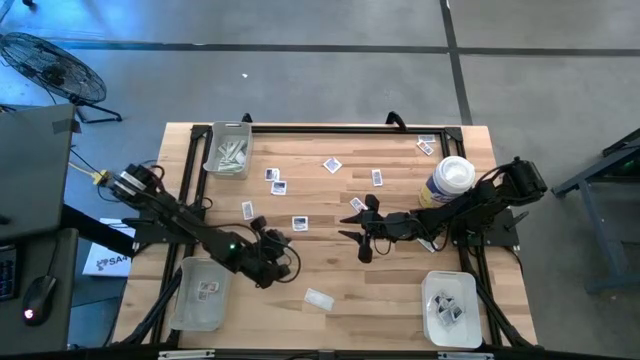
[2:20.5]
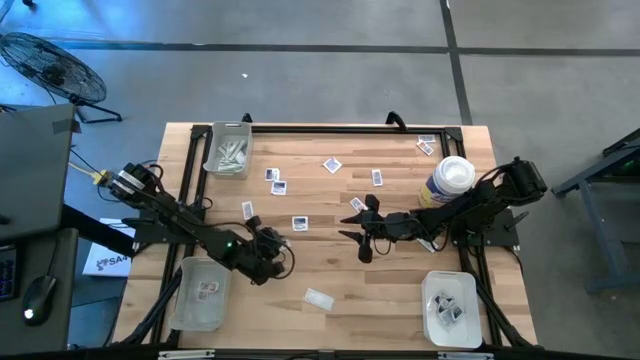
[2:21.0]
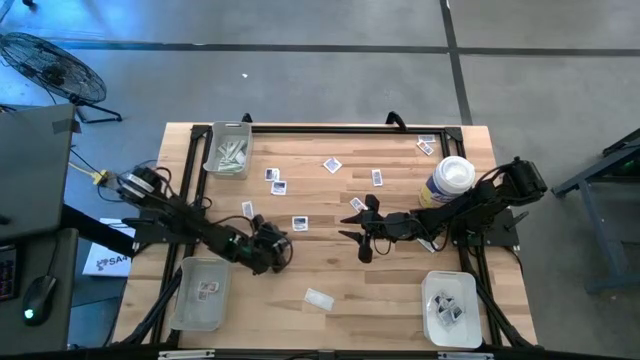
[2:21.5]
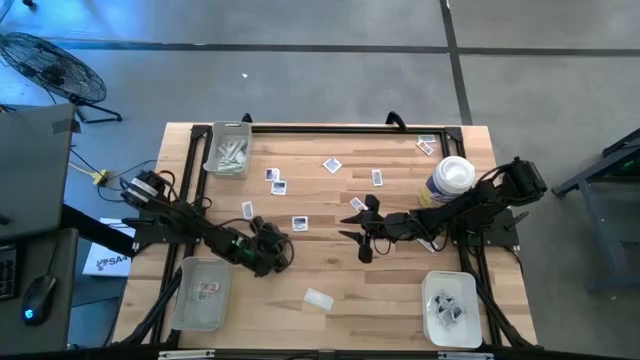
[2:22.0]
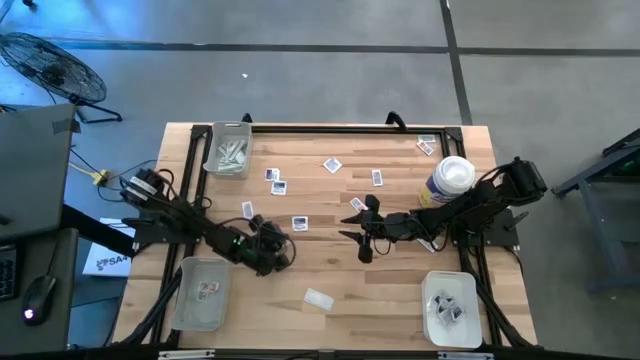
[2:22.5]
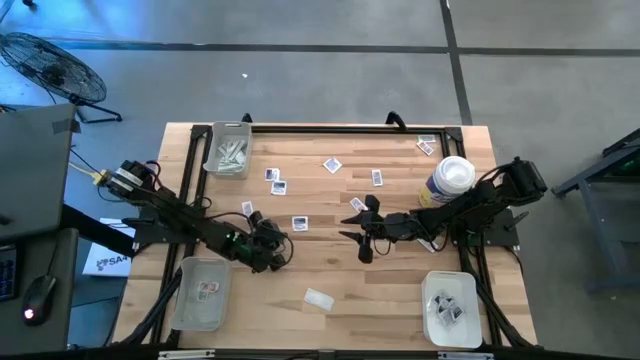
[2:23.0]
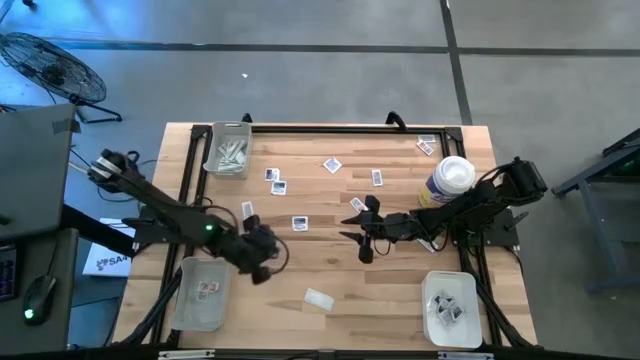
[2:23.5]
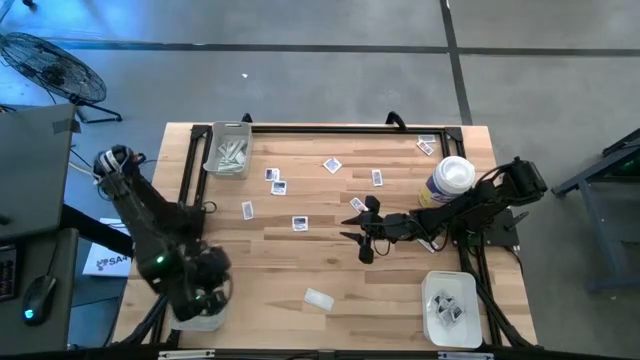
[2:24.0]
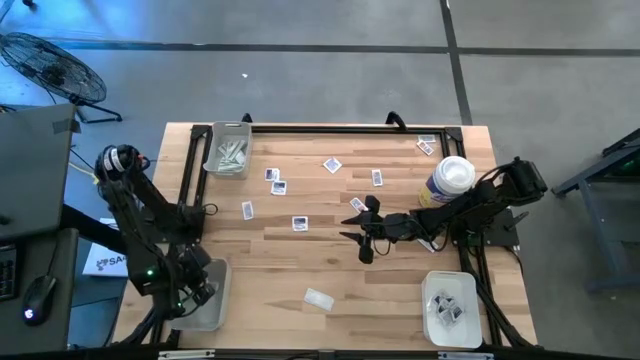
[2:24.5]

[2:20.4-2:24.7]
Task: Pick & Place First Aid Supplies
Put the orange ointment pack into the bottom gray bin

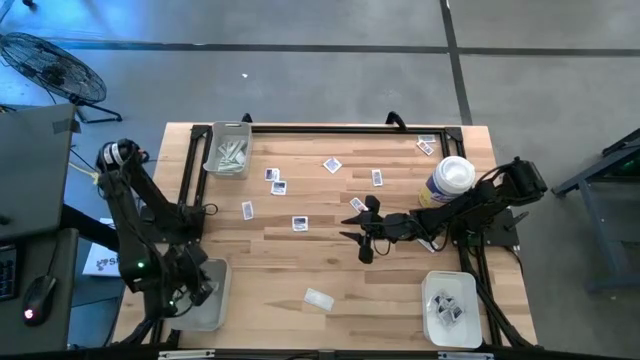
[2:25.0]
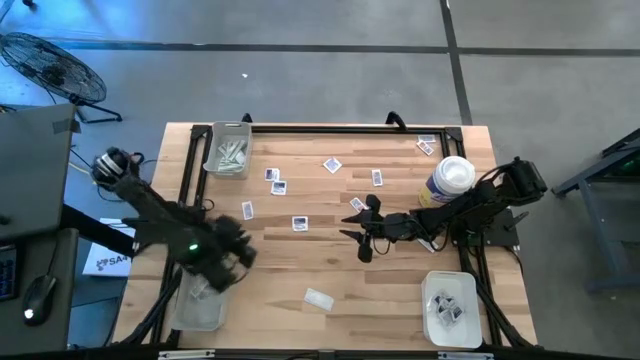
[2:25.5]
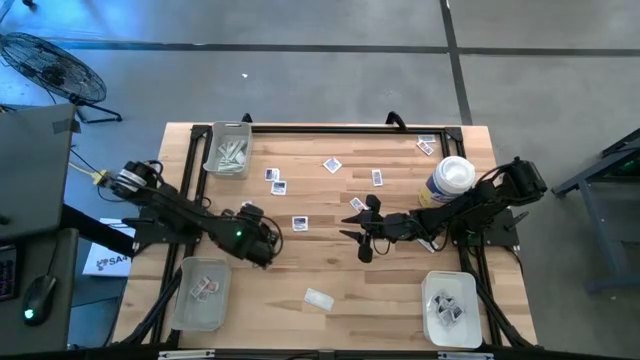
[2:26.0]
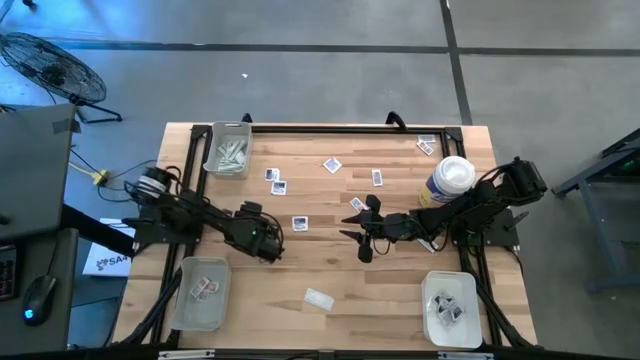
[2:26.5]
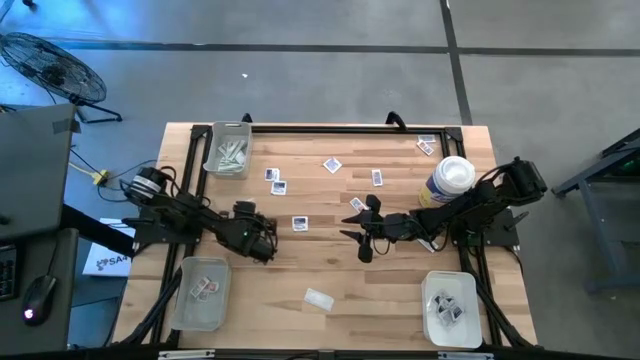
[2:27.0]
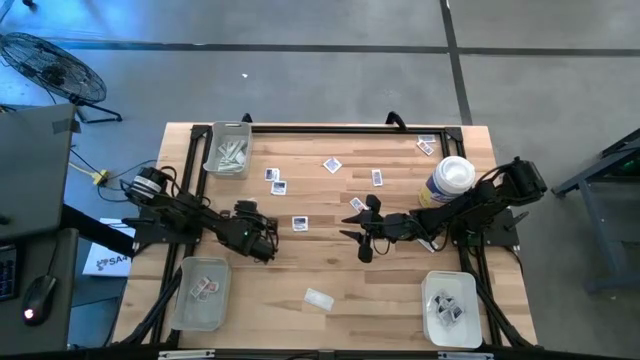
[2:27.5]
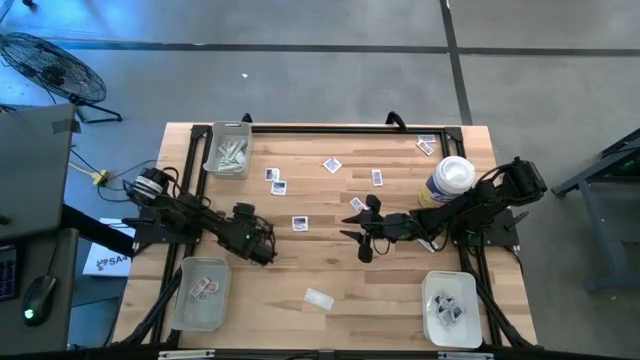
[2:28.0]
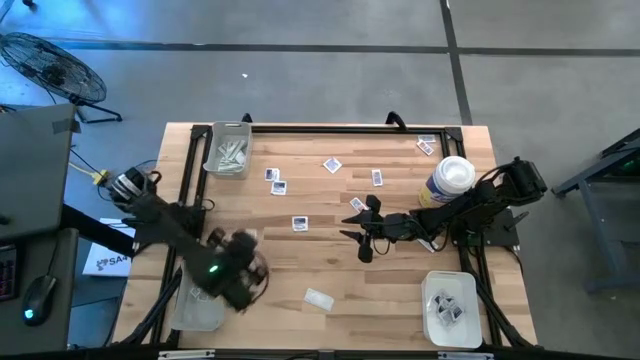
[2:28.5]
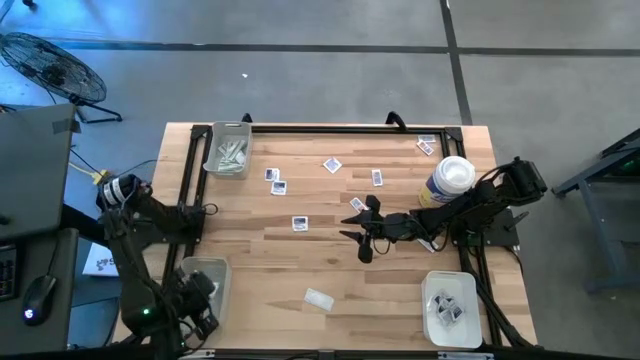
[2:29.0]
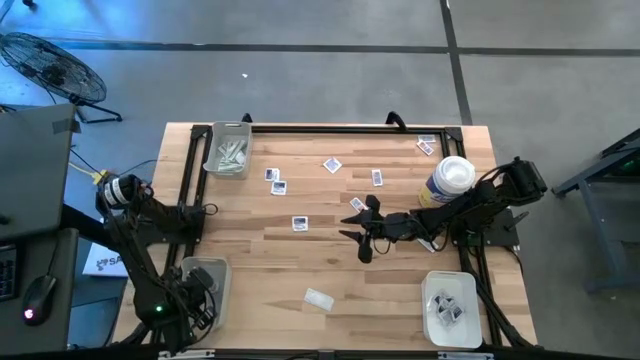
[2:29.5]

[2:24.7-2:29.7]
Put the orange ointment pack into the bottom gray bin

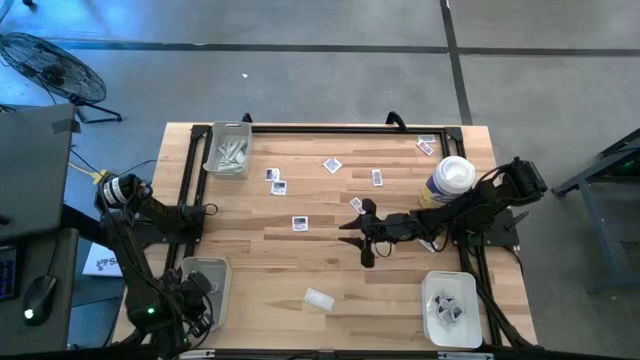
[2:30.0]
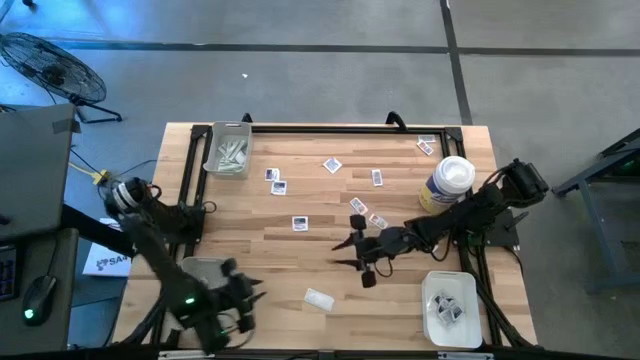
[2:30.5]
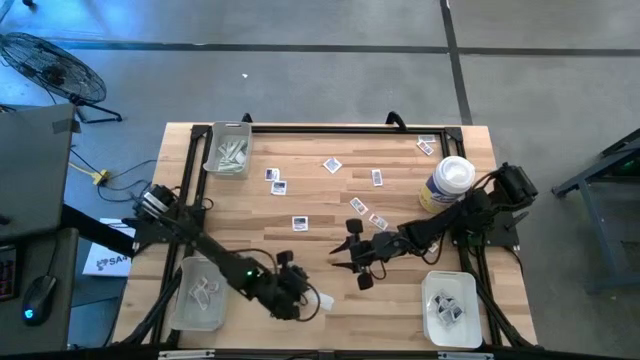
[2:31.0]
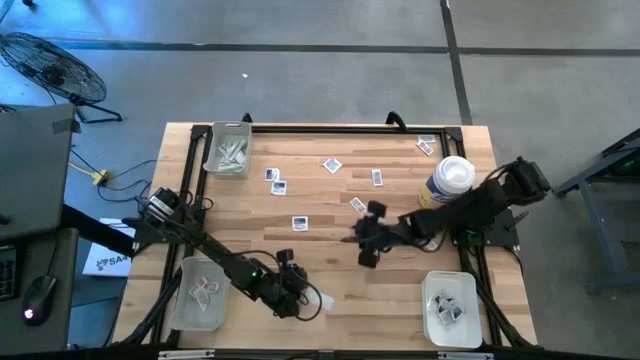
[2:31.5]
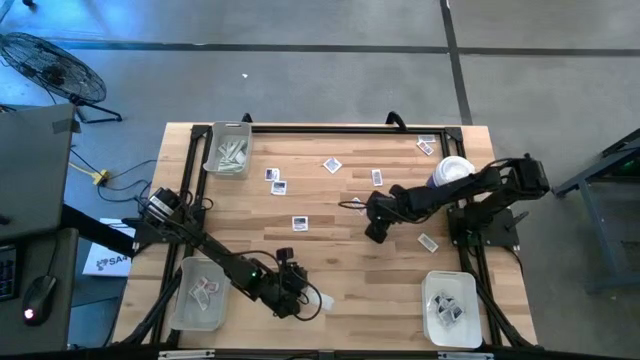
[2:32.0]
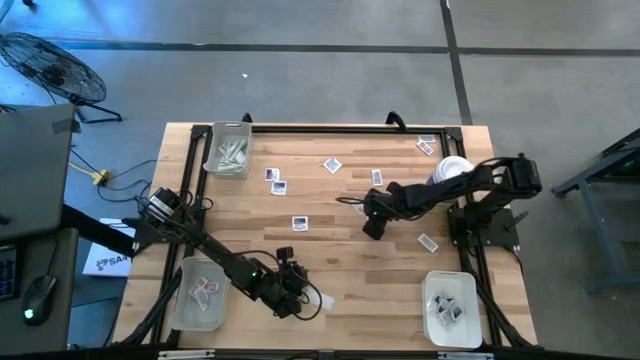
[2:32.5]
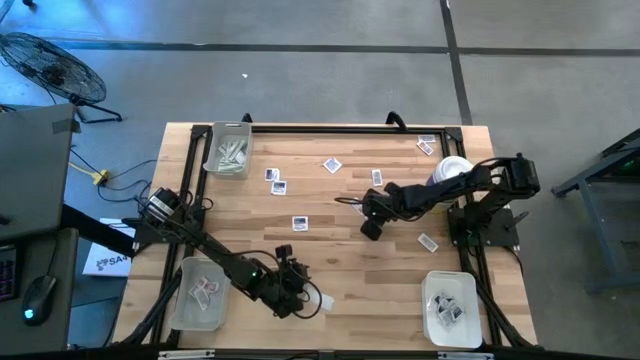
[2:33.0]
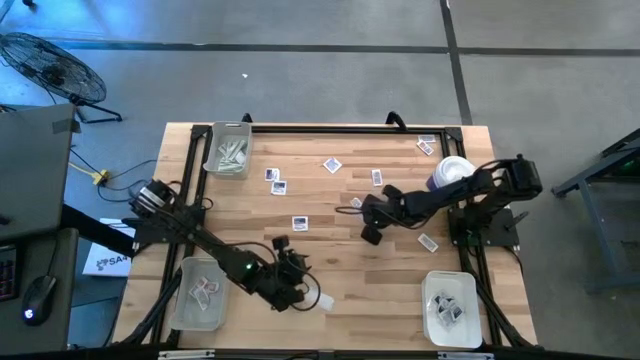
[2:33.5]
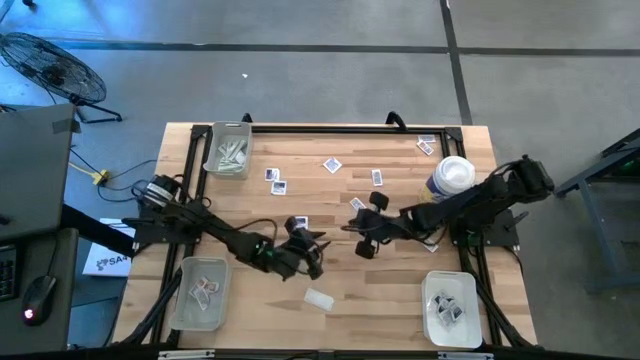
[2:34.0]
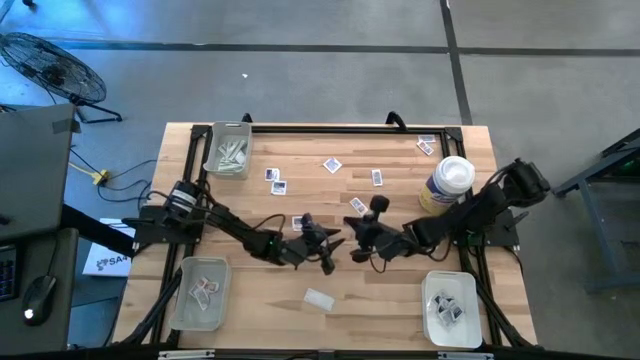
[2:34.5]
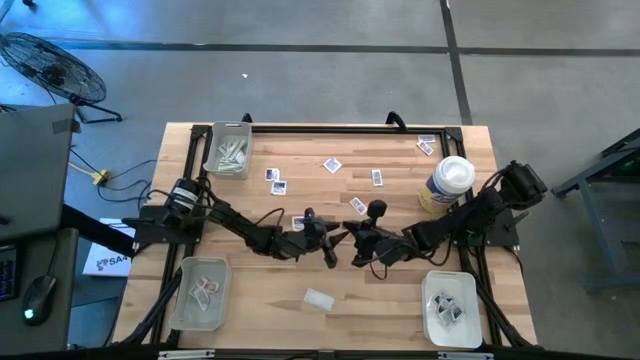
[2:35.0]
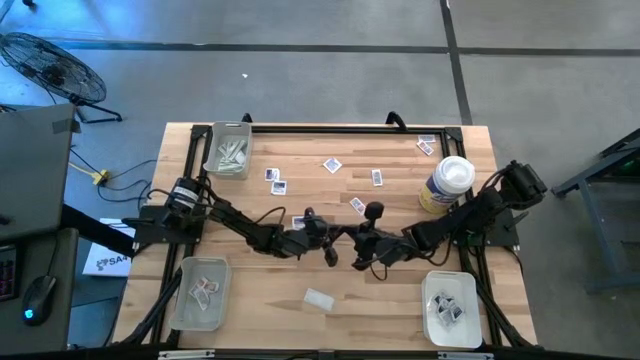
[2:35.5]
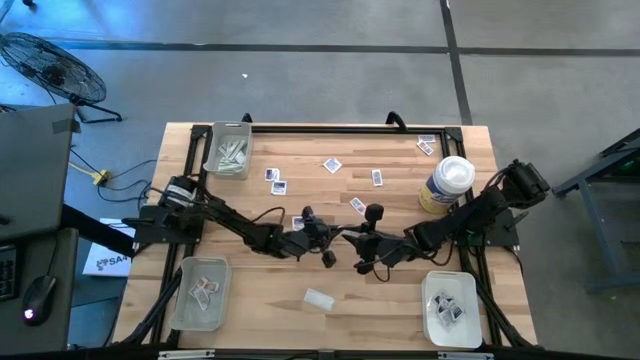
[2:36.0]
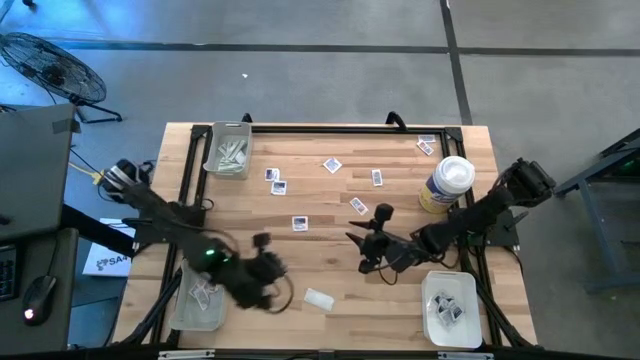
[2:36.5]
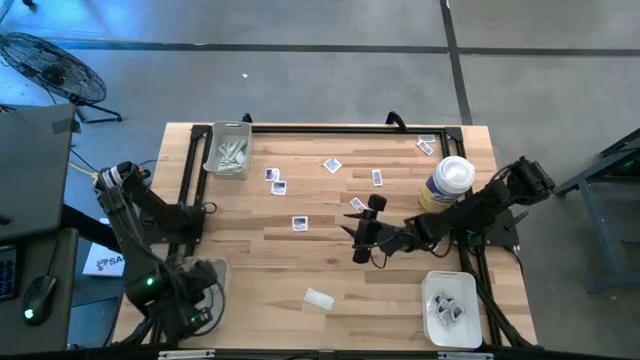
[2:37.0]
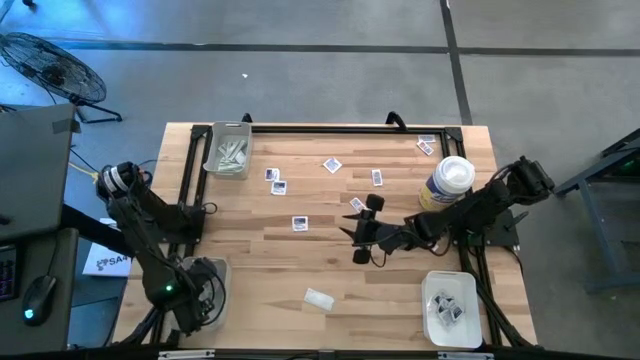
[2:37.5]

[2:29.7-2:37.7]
Put the orange ointment pack into the bottom gray bin
